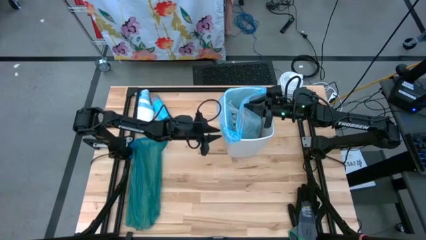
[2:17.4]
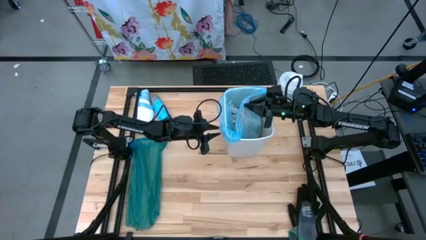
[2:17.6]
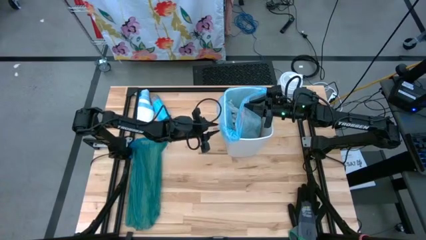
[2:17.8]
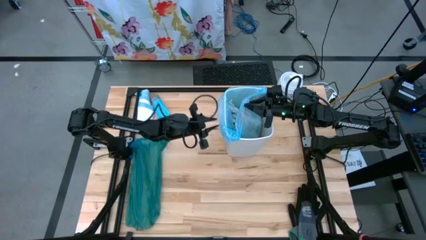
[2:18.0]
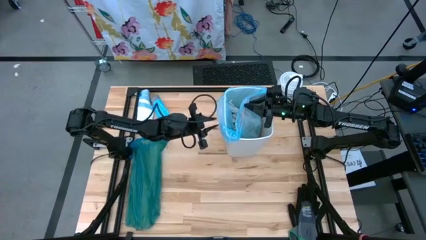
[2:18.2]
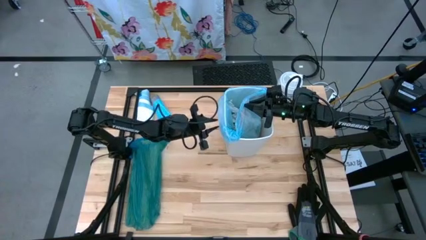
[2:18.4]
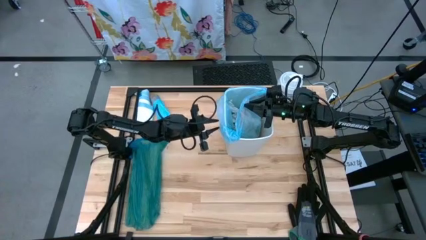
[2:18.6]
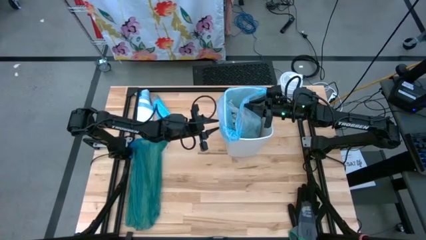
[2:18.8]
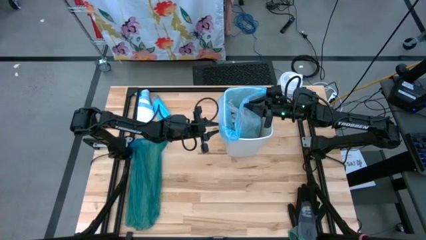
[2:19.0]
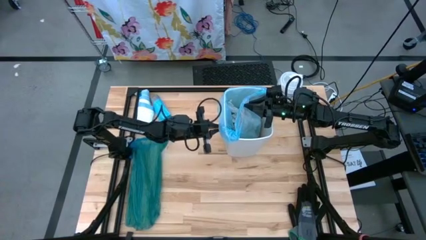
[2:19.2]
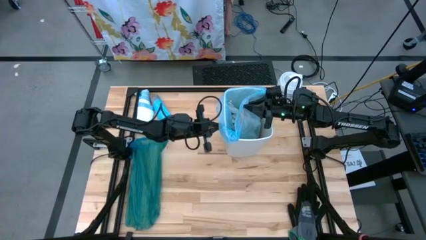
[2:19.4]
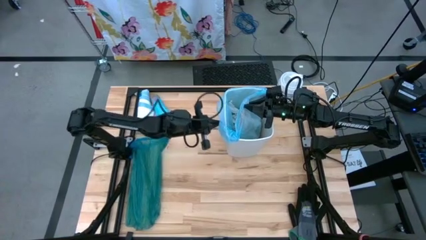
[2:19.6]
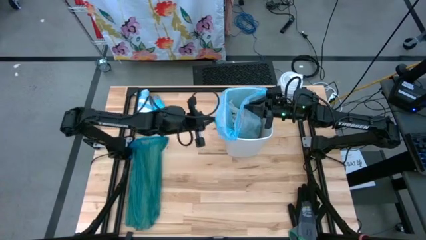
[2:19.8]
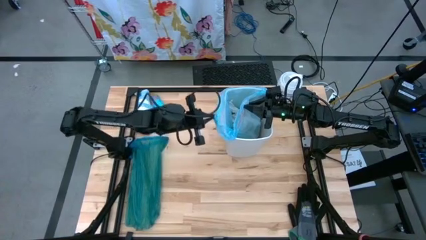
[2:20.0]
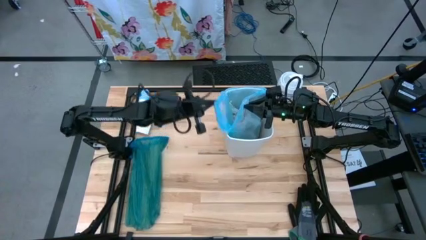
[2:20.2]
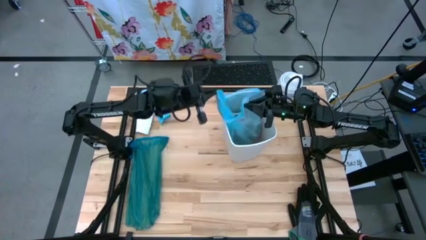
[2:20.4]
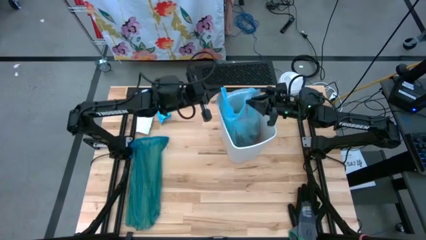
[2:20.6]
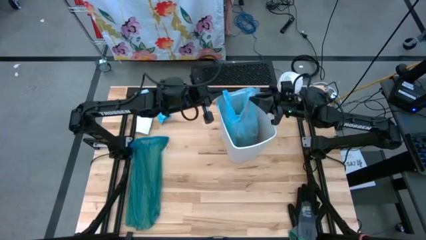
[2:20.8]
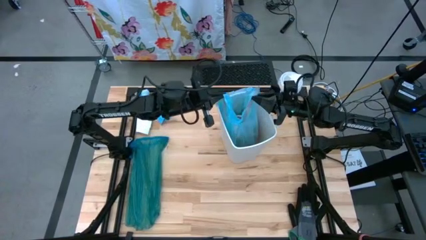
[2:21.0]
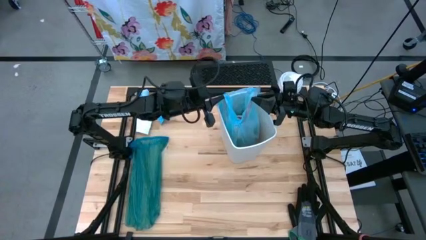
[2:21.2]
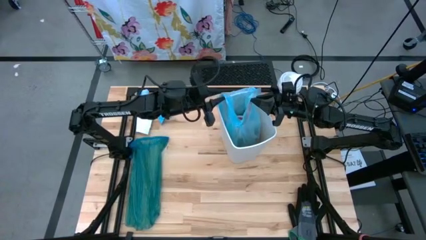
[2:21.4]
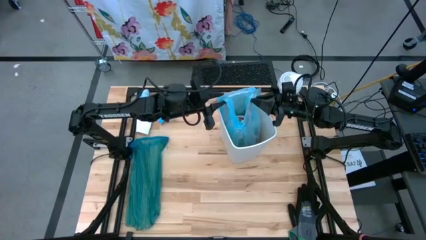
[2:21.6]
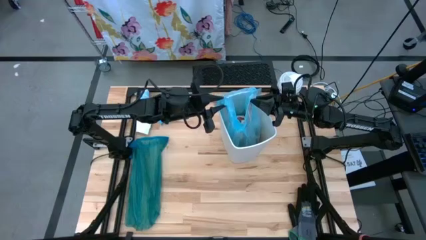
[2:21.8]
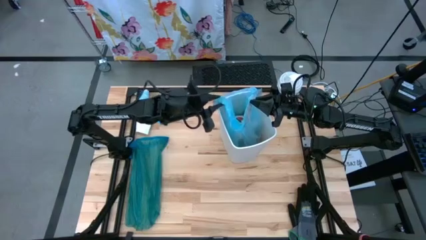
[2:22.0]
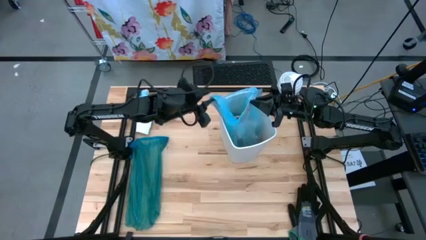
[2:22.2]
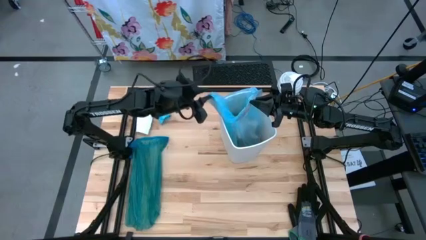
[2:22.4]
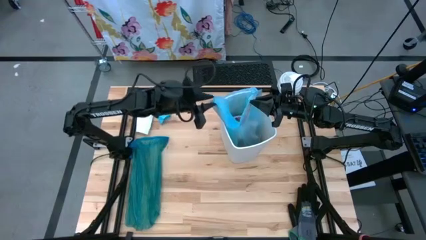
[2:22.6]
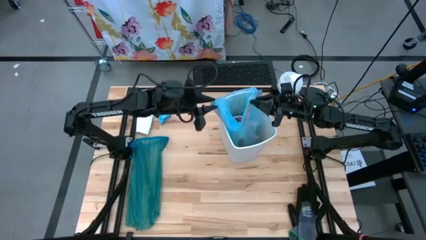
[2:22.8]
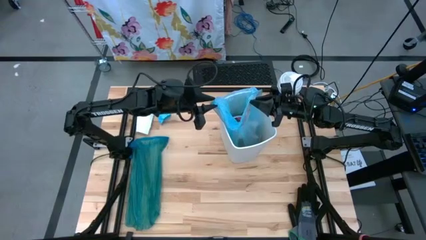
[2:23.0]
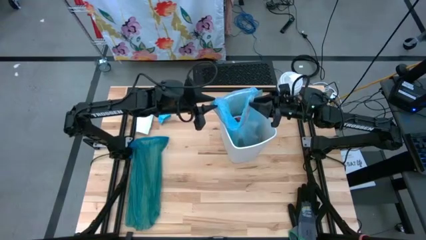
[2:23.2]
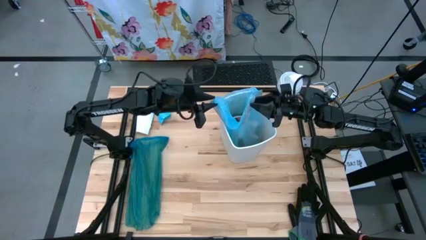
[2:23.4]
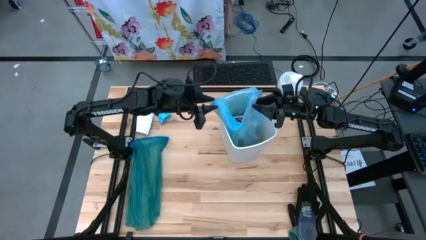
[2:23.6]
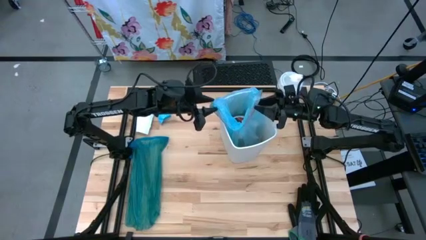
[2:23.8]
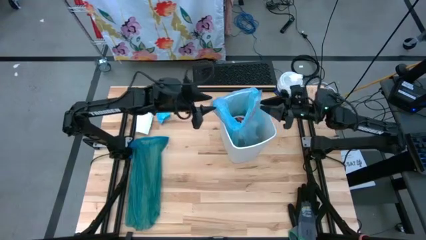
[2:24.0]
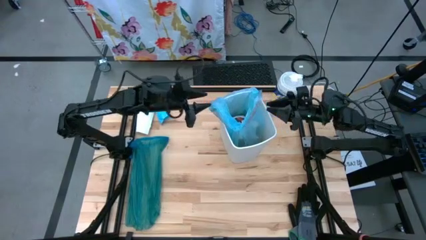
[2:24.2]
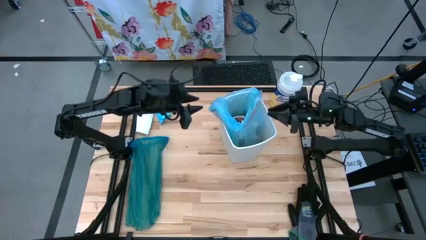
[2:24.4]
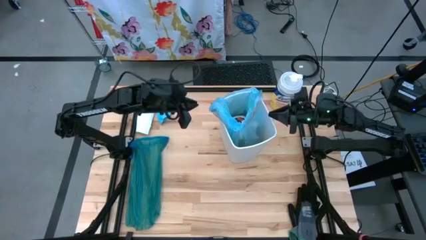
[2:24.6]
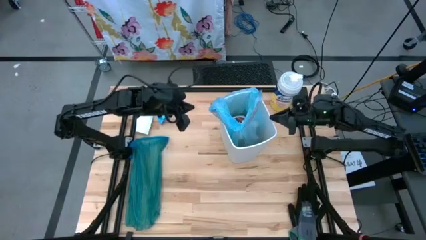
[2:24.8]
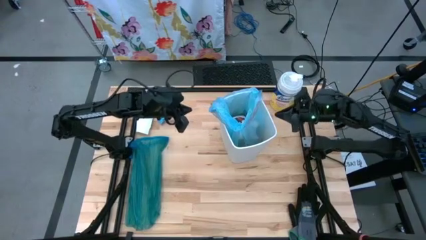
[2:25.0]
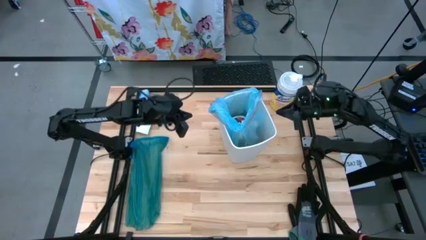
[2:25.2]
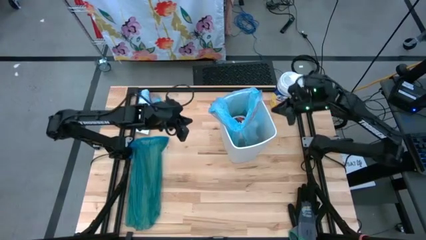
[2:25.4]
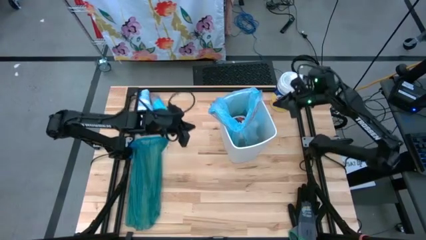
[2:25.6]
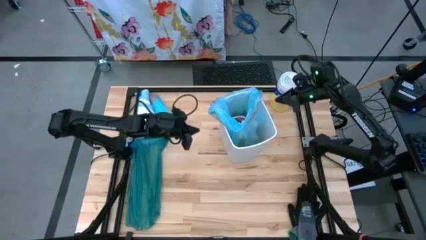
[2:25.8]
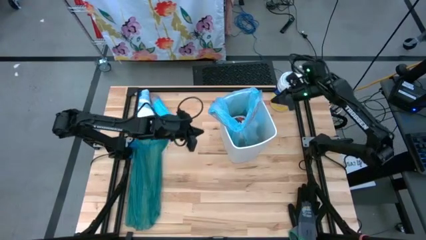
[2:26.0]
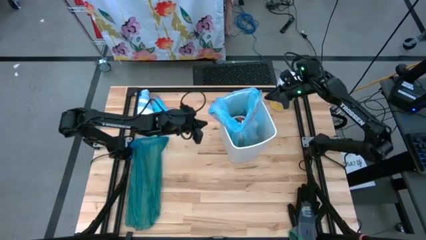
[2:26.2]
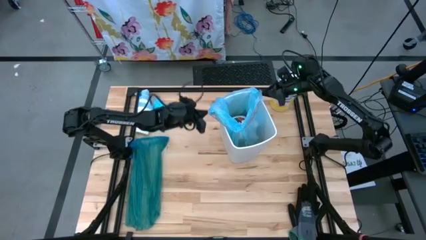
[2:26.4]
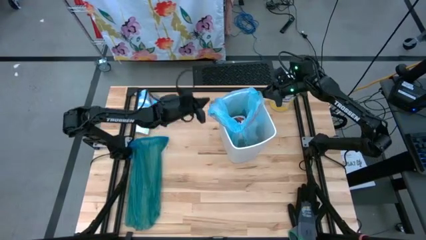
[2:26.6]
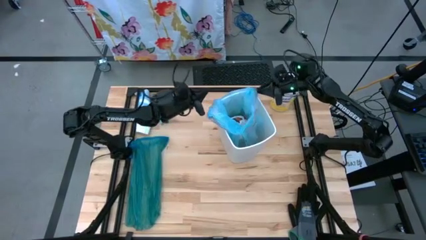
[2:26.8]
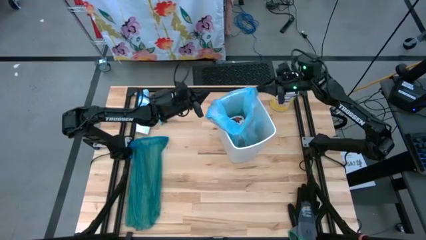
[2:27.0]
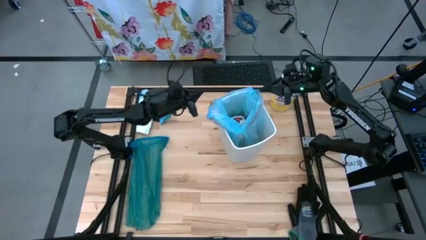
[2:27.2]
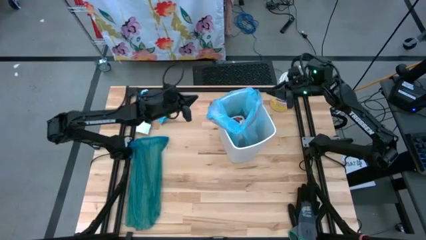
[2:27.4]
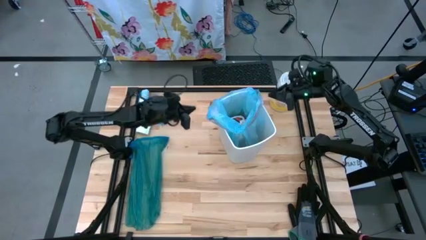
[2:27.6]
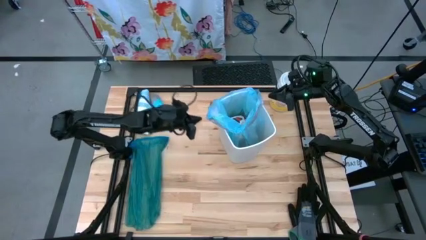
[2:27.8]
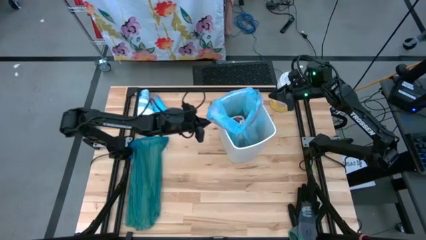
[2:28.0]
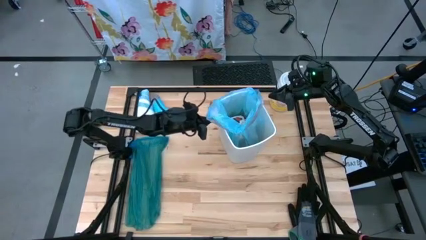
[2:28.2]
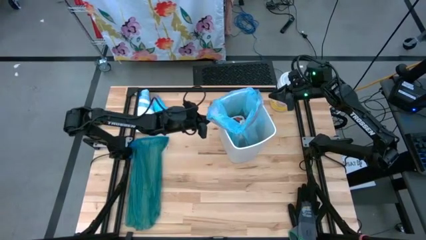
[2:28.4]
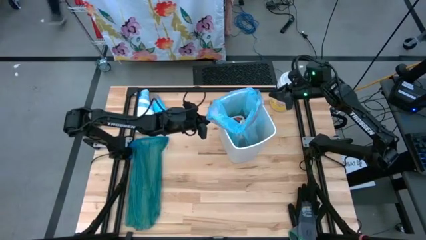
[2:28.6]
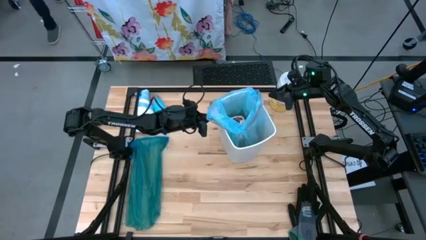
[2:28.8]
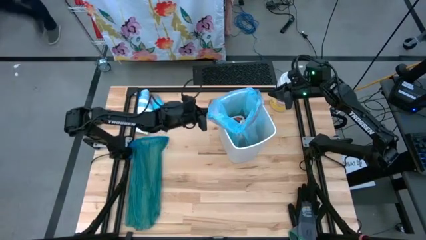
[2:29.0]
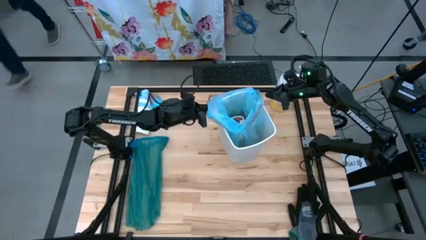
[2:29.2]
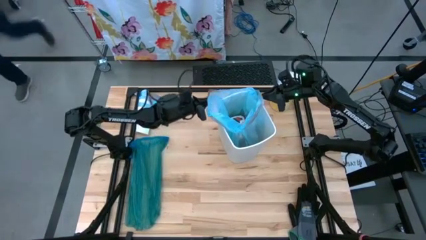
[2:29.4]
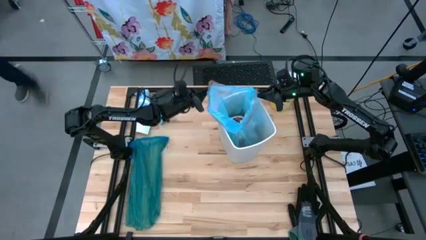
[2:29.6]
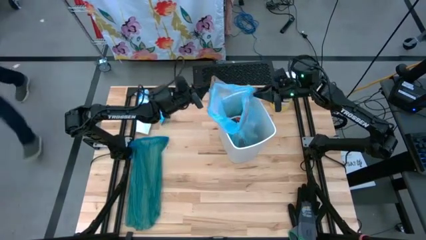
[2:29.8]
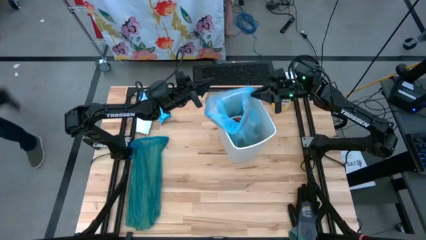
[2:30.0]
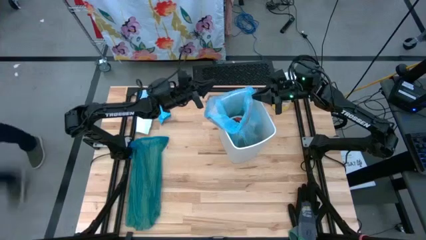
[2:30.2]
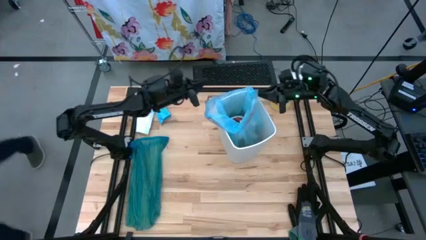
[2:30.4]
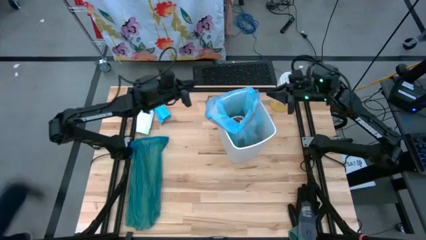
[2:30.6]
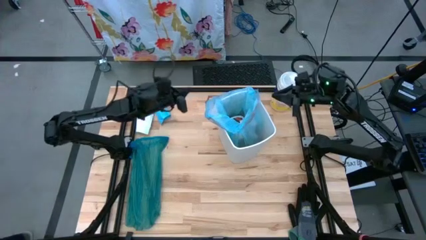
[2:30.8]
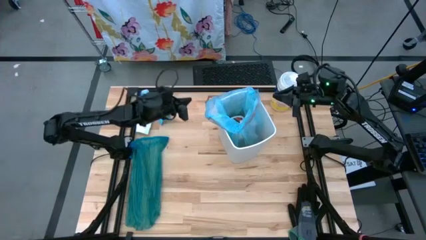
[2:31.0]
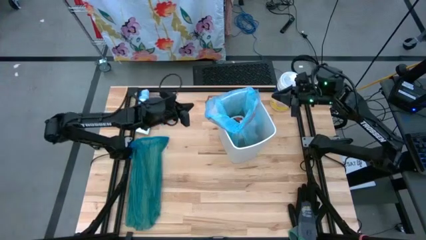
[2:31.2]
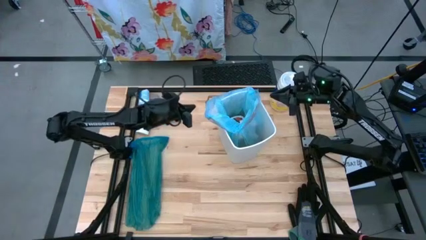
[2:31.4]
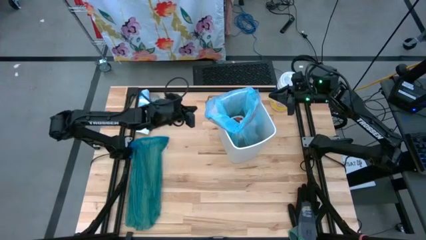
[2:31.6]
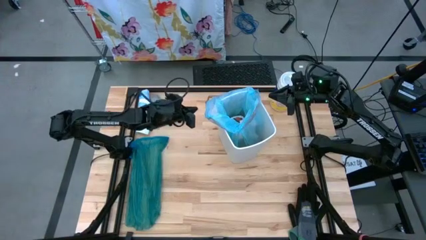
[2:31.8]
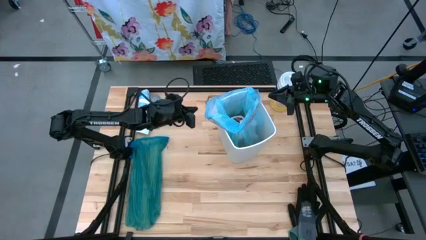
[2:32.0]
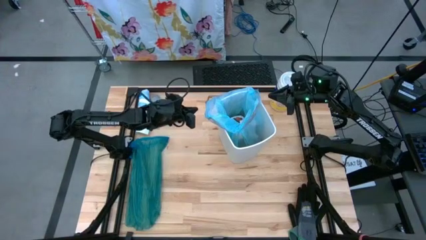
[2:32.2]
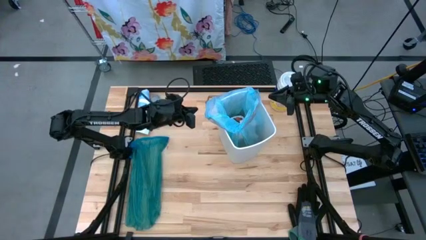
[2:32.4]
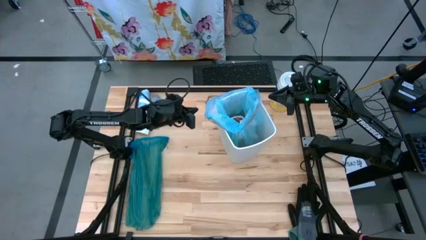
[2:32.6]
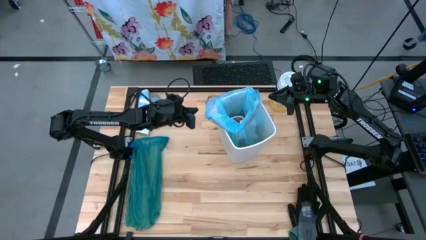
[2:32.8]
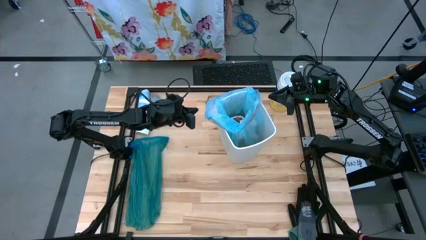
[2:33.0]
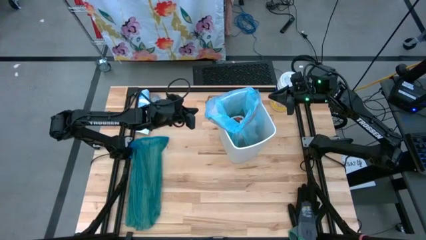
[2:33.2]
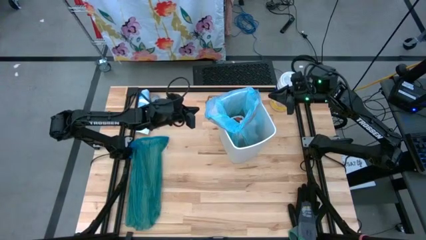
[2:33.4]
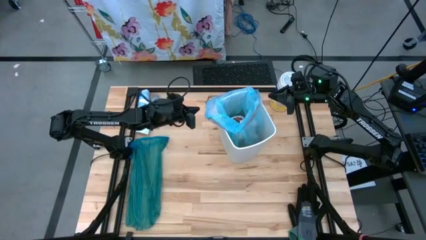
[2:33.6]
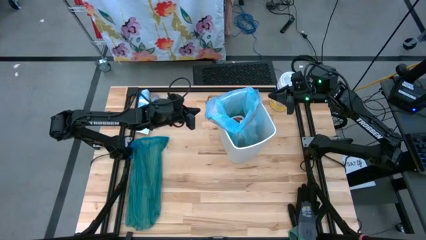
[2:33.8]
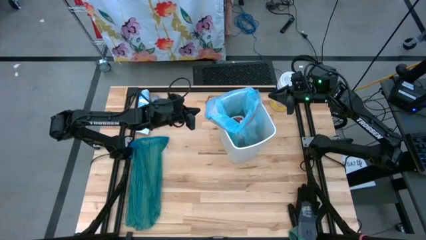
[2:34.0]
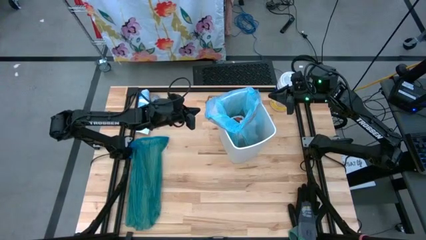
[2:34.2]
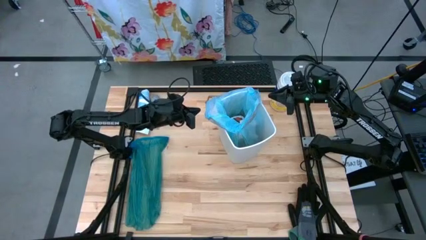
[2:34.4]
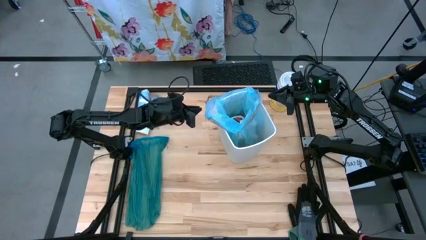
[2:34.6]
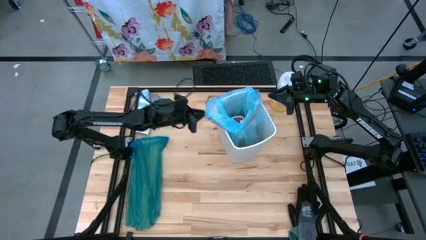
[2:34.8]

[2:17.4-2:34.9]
Task: place trash/remove bag and relplace
Close the blue trash bag
